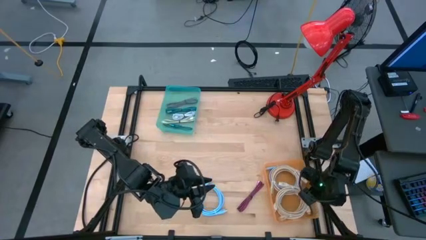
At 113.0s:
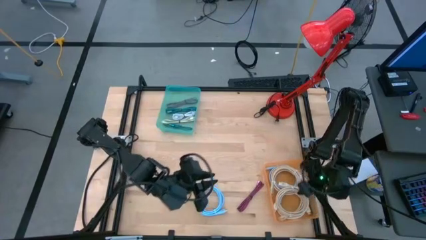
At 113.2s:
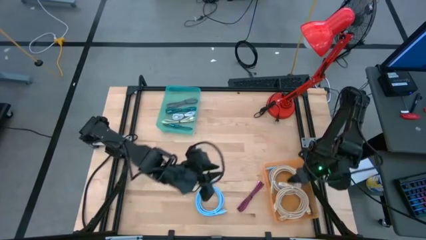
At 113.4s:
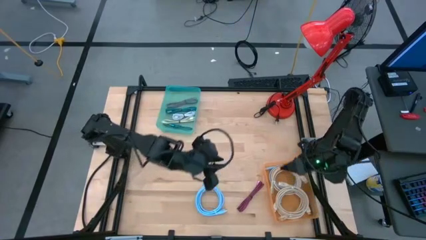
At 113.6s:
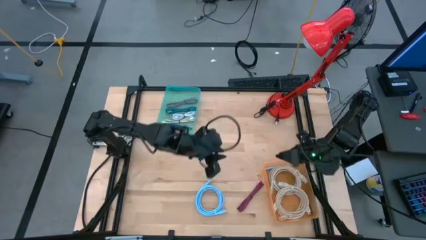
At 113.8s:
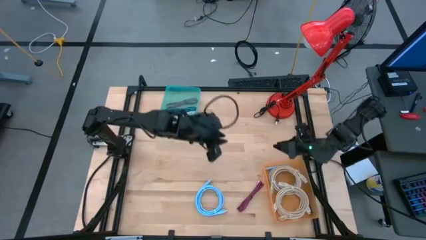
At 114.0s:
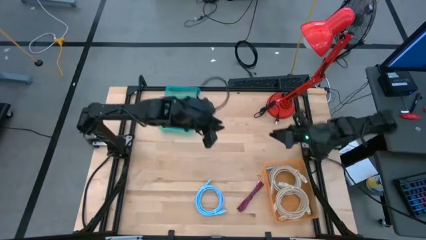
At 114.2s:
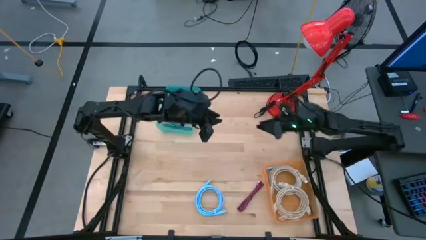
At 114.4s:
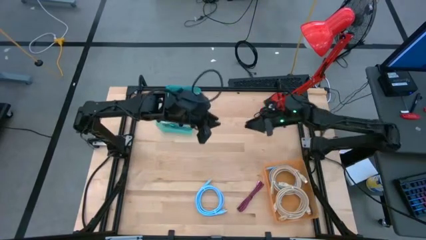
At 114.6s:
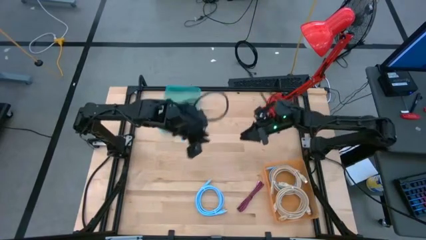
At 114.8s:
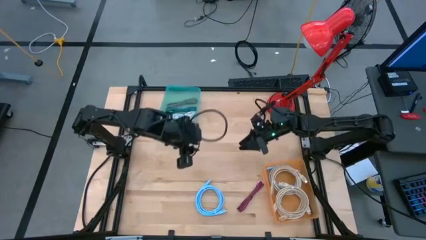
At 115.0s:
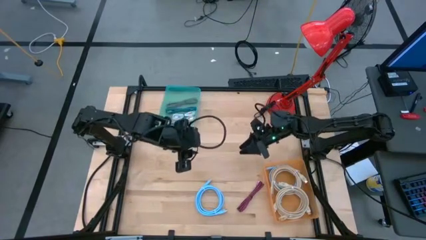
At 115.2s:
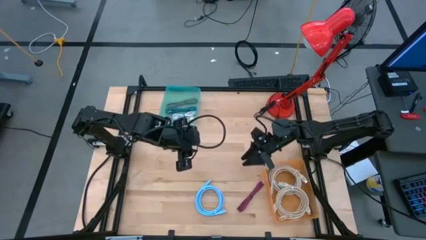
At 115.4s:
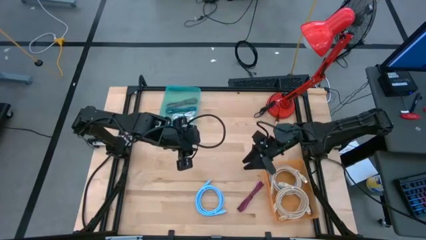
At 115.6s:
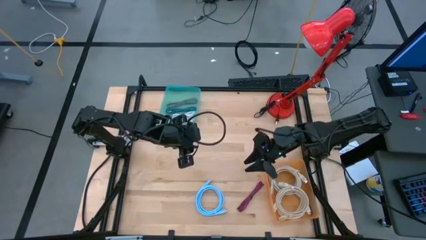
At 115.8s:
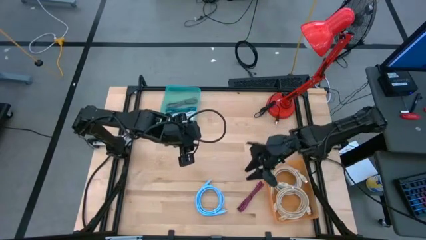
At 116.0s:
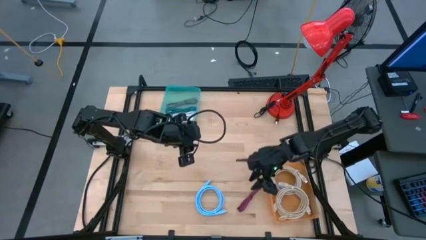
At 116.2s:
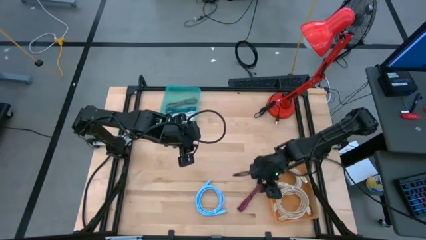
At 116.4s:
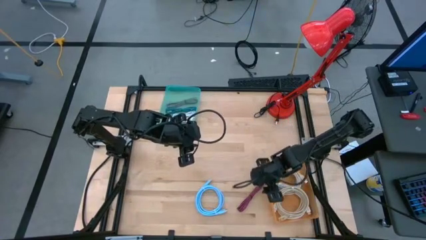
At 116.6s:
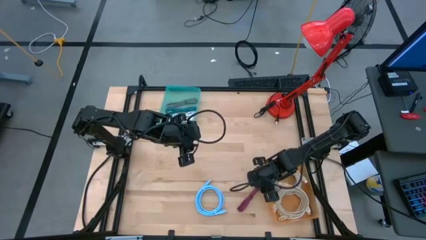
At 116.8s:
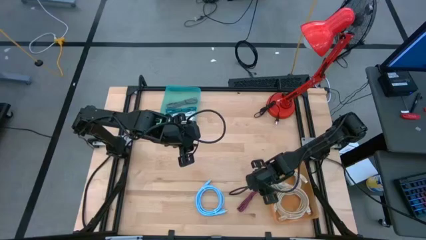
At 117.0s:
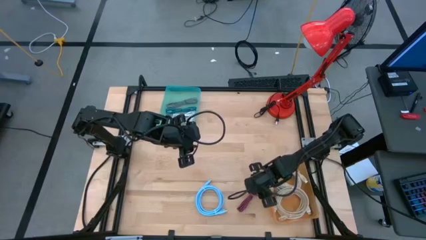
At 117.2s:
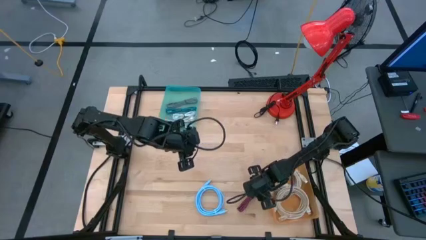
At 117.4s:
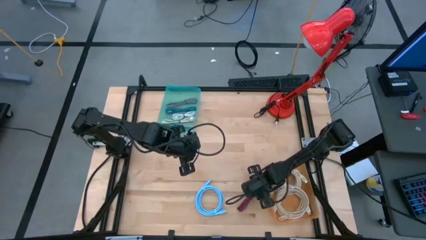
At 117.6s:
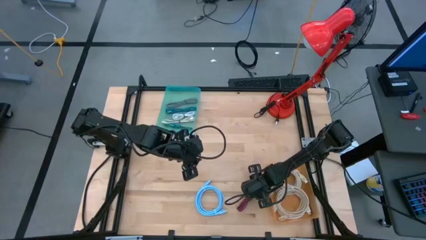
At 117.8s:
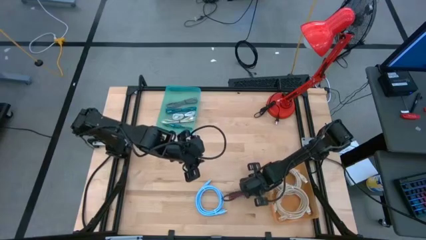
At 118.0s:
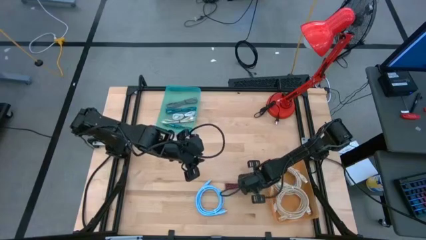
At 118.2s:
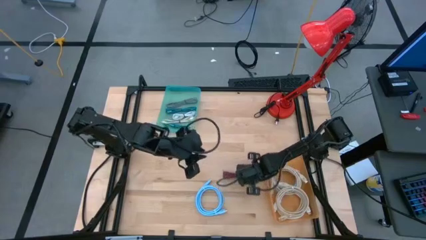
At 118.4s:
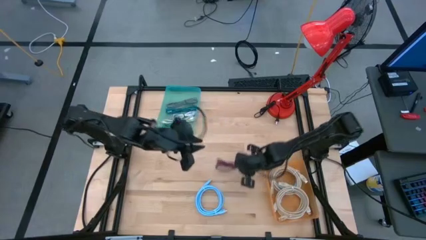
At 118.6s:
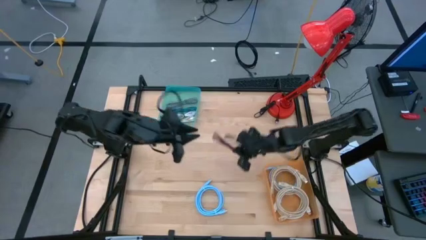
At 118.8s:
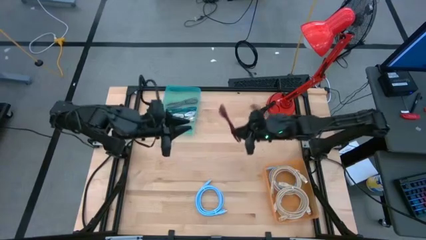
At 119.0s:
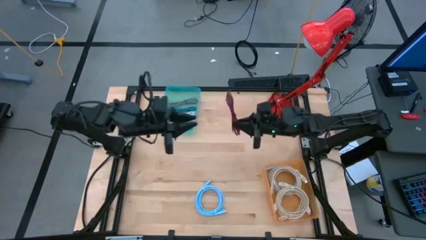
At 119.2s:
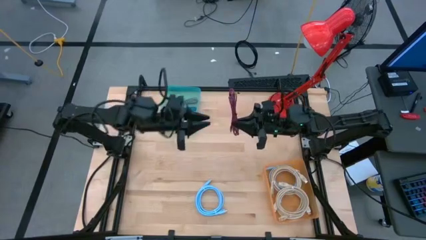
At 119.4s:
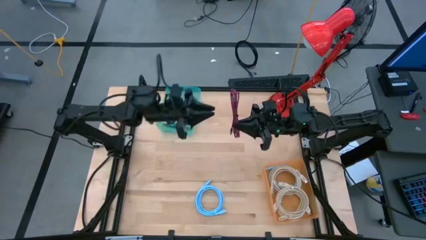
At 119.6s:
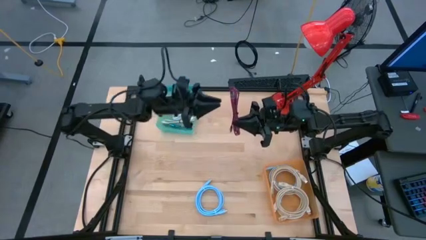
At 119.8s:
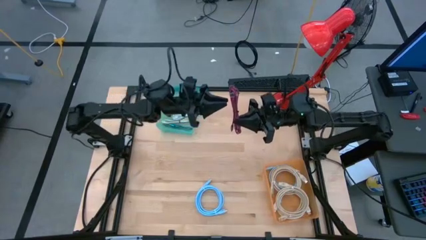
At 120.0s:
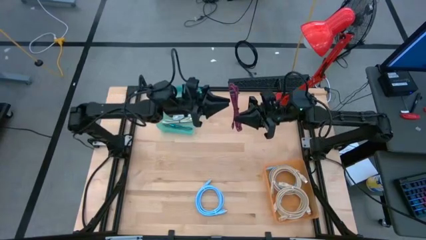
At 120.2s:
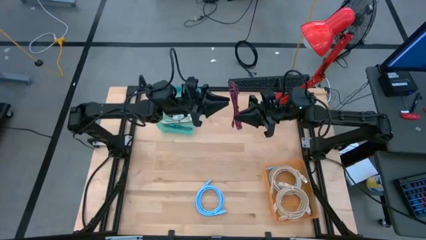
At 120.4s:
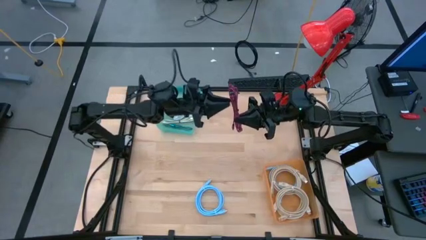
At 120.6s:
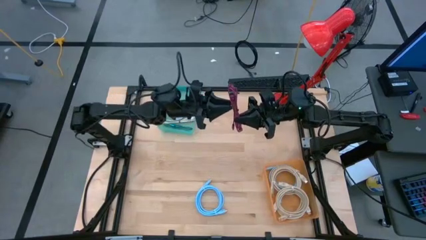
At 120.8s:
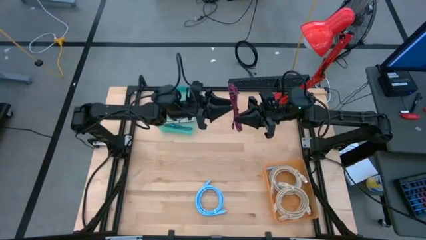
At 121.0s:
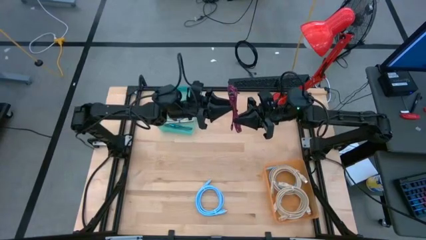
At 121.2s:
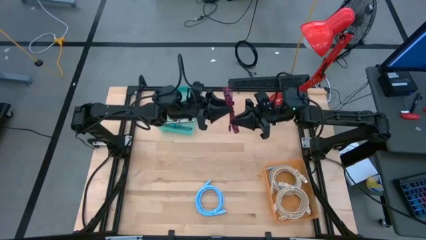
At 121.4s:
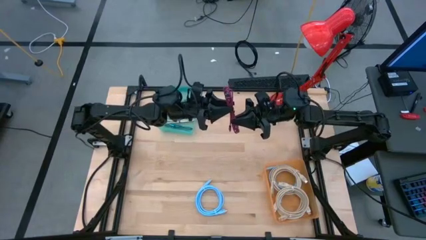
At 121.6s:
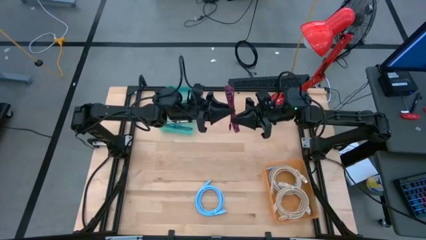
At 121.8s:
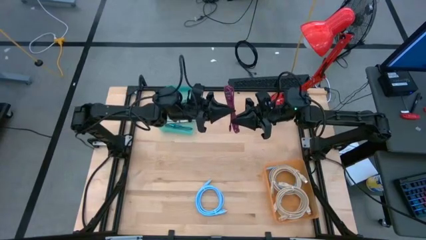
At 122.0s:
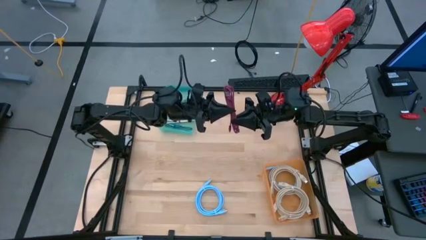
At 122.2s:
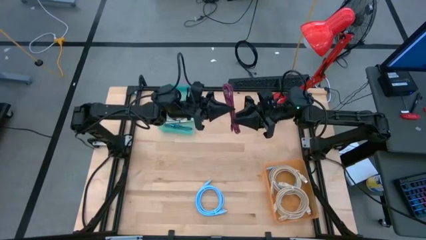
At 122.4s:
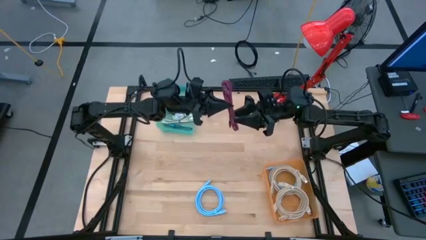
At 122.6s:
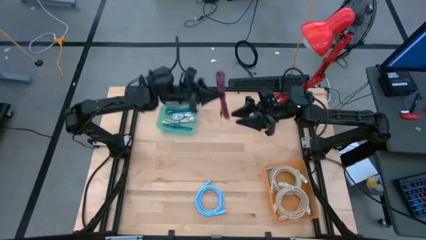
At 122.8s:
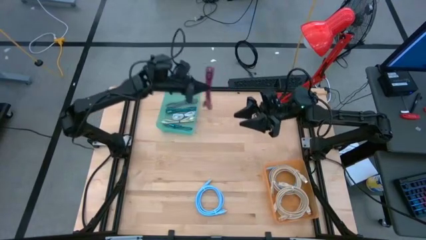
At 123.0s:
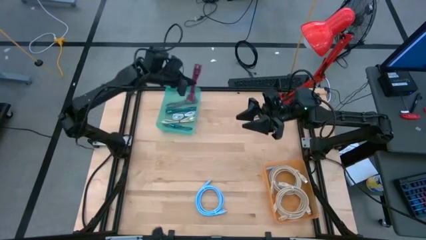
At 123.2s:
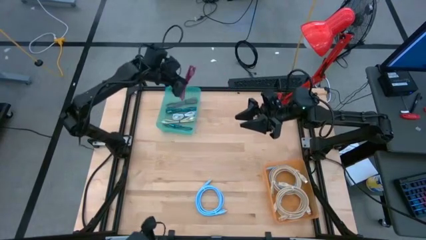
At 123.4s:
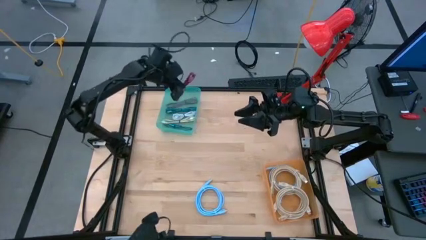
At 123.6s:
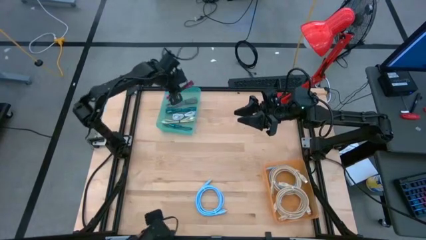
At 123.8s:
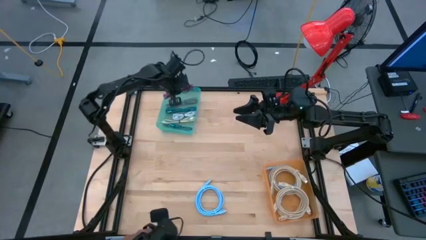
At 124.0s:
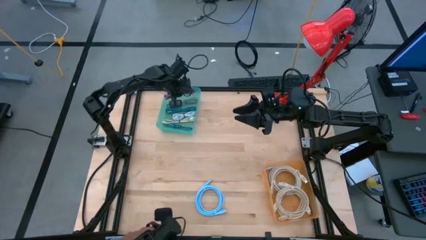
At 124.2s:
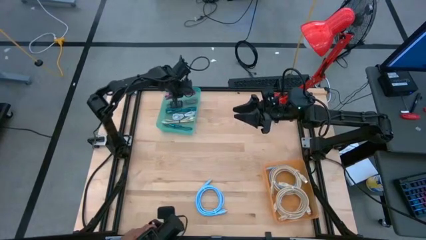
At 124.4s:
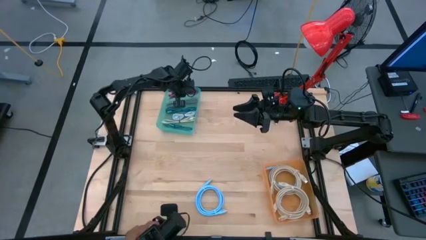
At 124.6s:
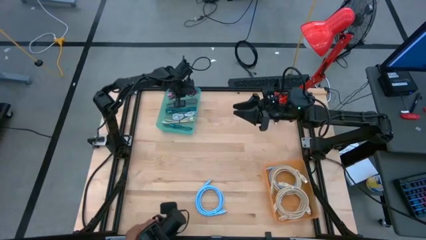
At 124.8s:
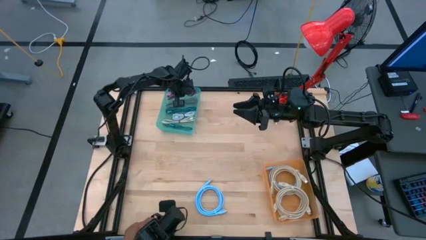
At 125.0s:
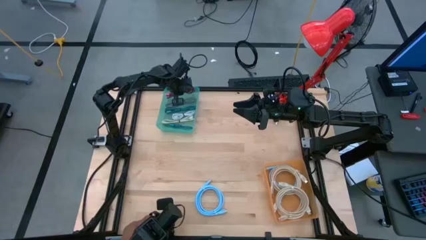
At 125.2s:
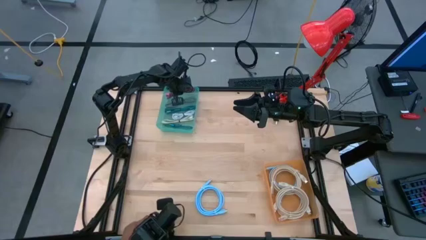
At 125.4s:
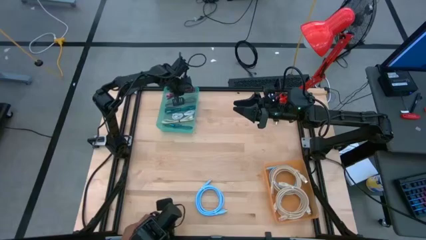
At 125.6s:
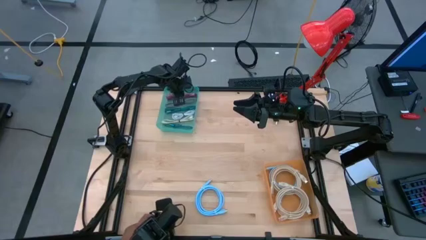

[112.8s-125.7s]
Task: Pick & Place USB Port
Put the red USB cable into the blue bin

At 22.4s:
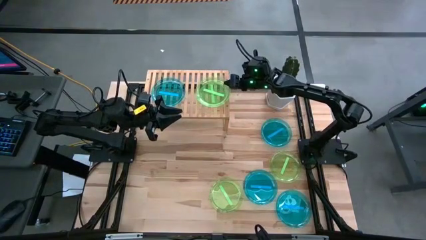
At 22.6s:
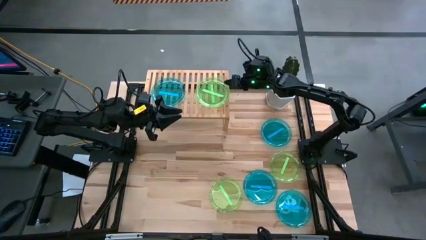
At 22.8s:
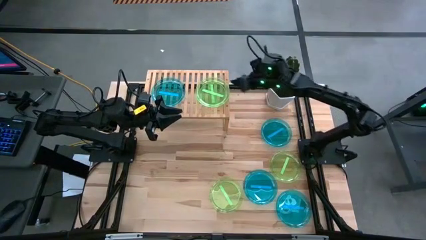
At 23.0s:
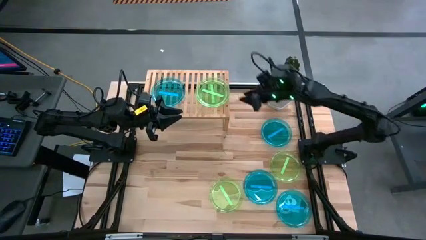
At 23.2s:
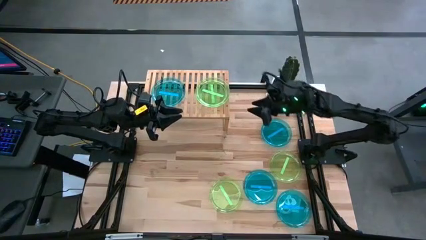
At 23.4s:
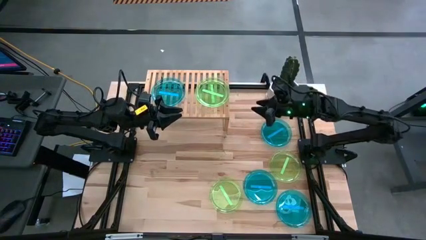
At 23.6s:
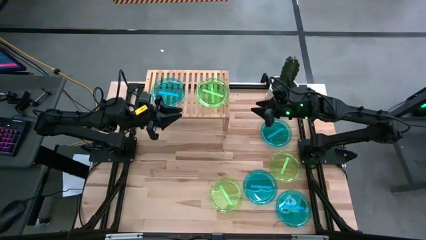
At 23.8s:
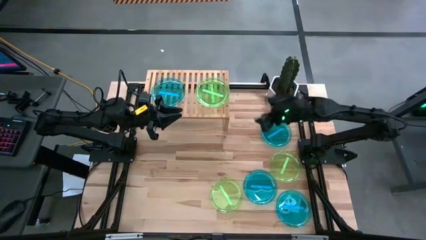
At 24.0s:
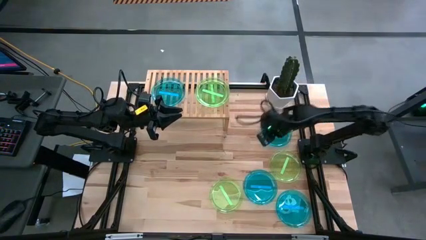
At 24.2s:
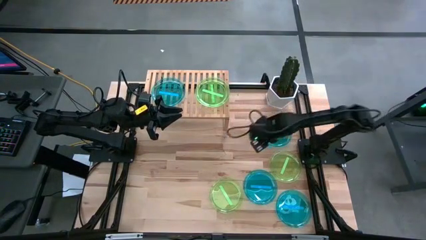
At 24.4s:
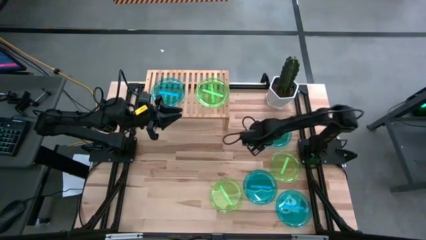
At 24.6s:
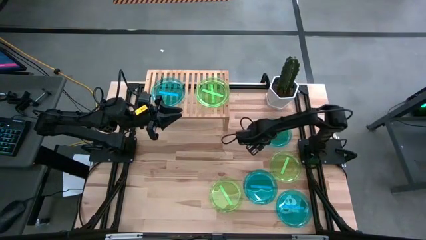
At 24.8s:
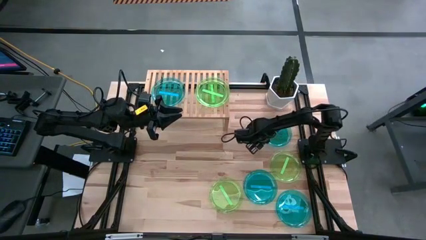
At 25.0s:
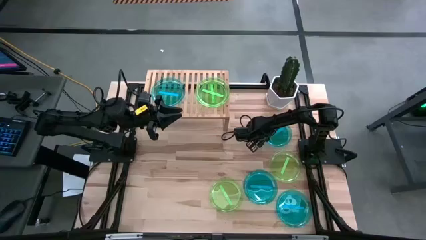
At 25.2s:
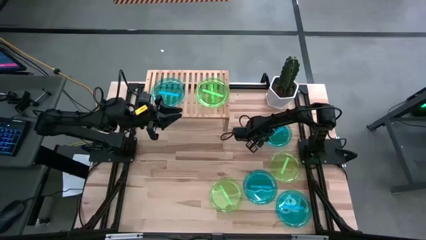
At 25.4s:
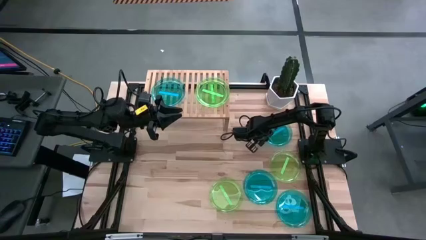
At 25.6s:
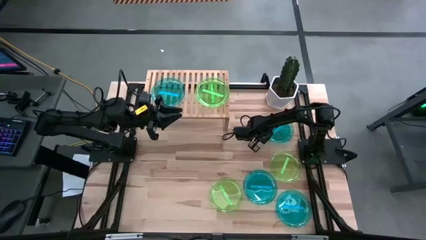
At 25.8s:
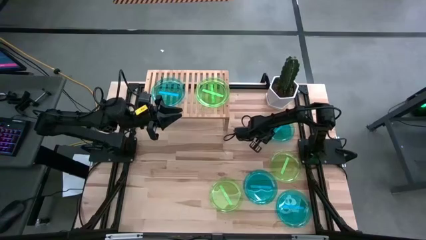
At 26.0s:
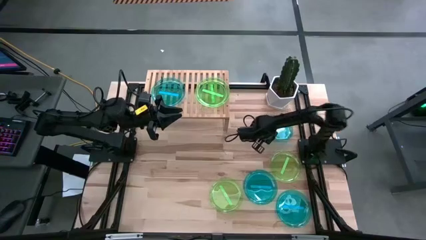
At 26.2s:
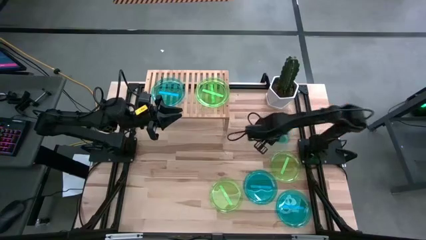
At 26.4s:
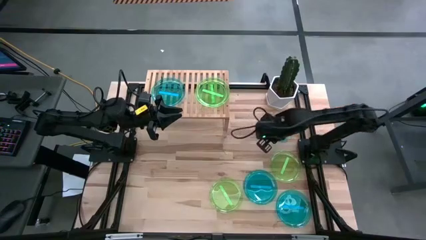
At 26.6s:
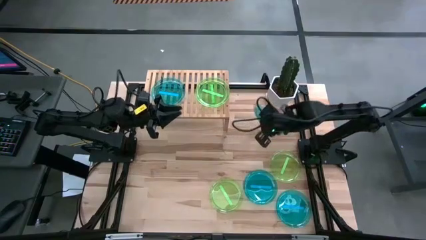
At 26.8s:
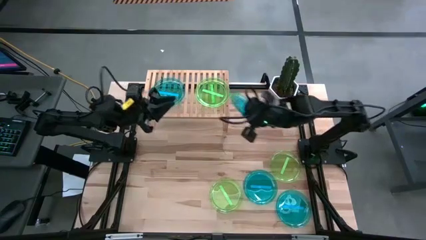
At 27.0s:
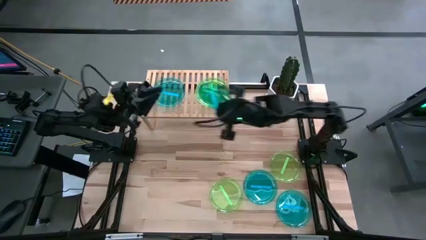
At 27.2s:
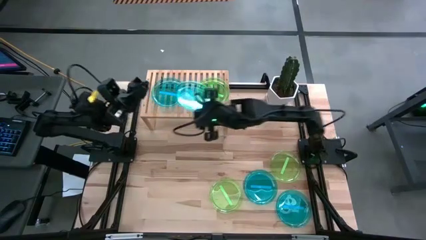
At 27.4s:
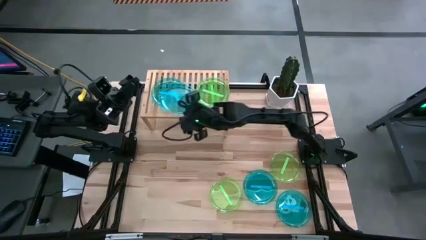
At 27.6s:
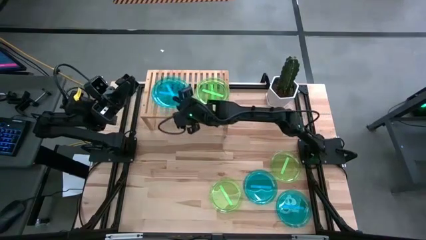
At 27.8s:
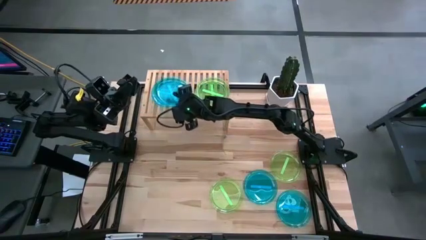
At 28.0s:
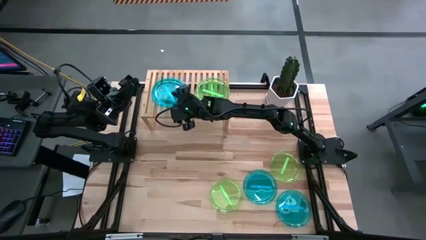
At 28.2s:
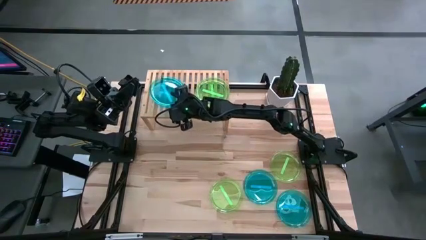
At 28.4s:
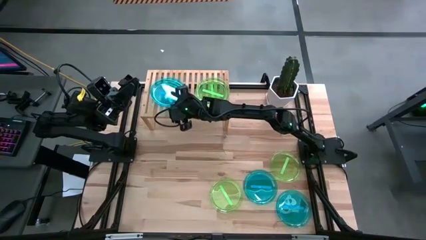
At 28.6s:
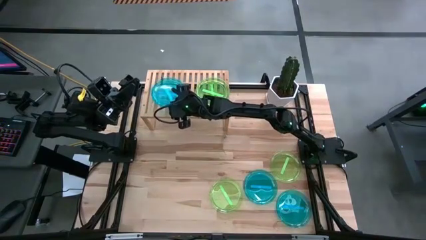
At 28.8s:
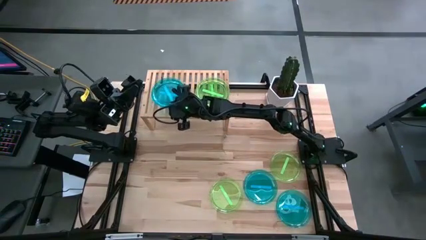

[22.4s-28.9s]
Task: Place and stack plates onto a shelf
Stack the blue plate on top of the blue plate on the shelf
